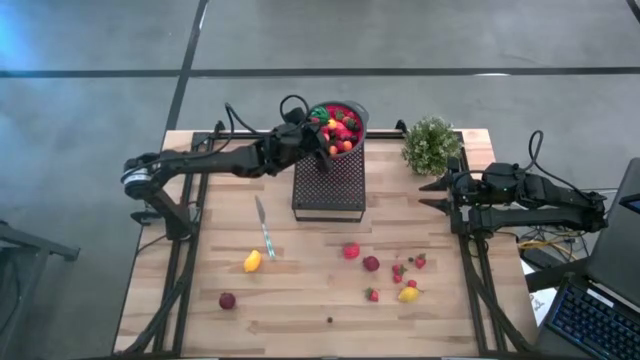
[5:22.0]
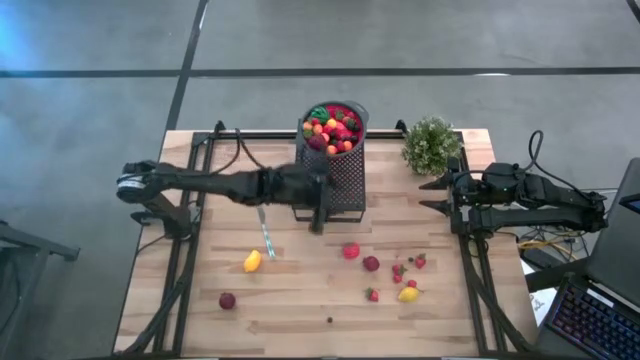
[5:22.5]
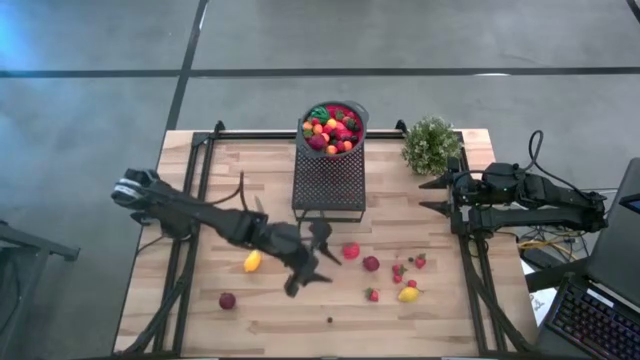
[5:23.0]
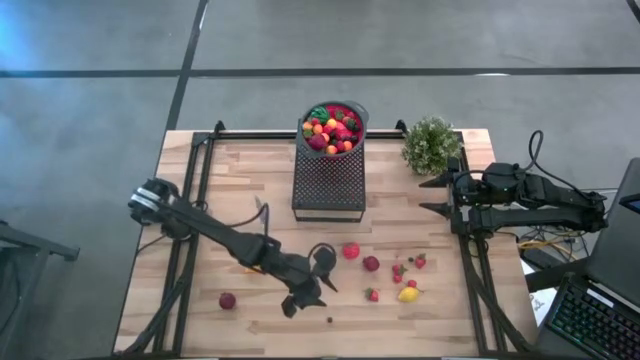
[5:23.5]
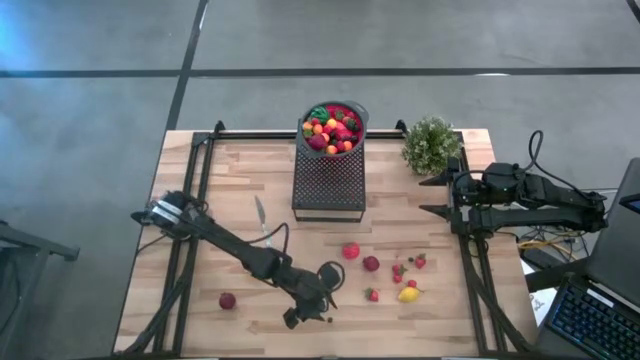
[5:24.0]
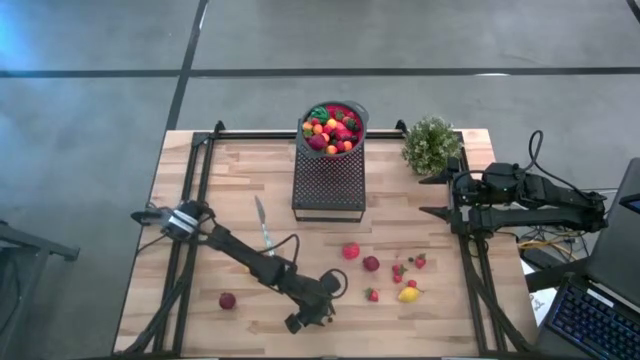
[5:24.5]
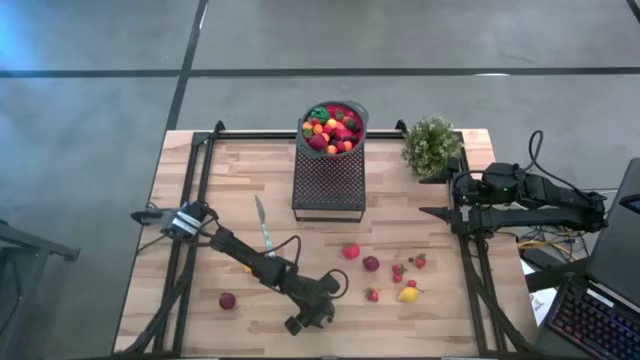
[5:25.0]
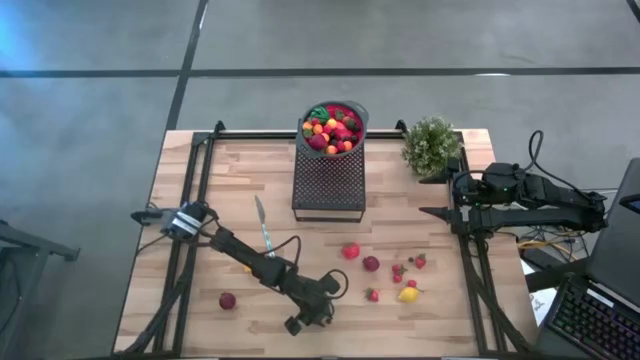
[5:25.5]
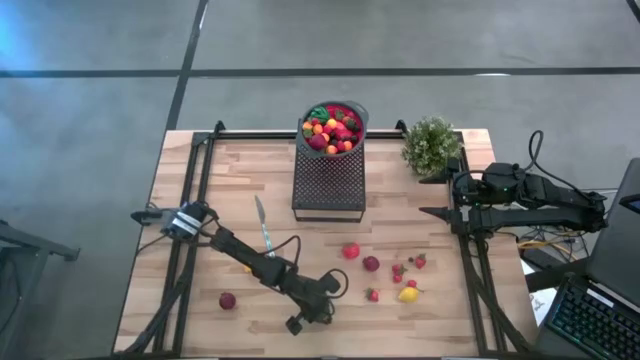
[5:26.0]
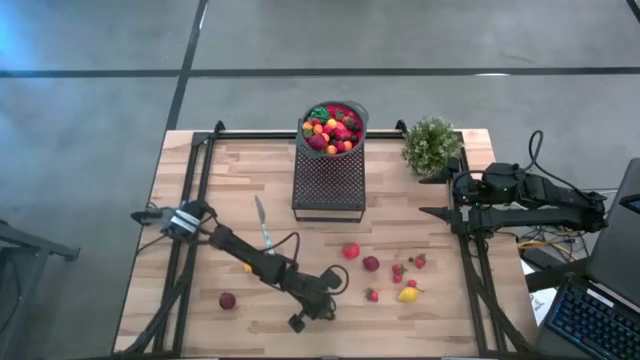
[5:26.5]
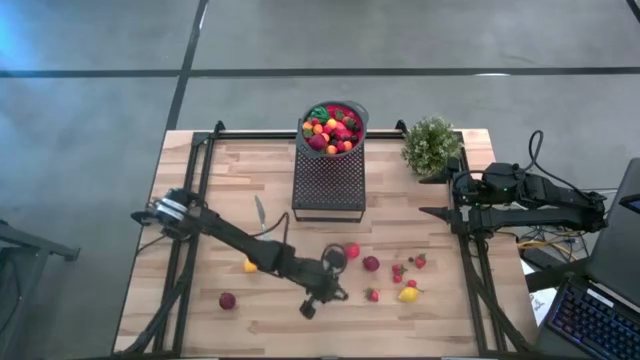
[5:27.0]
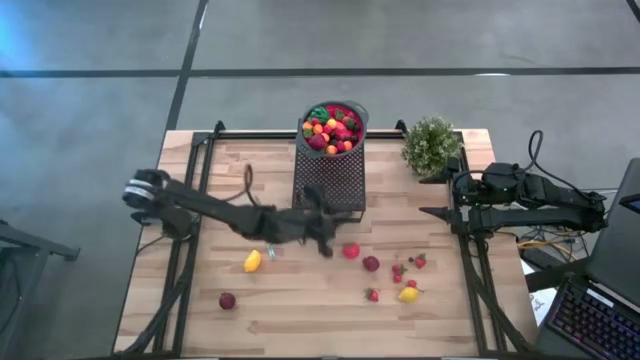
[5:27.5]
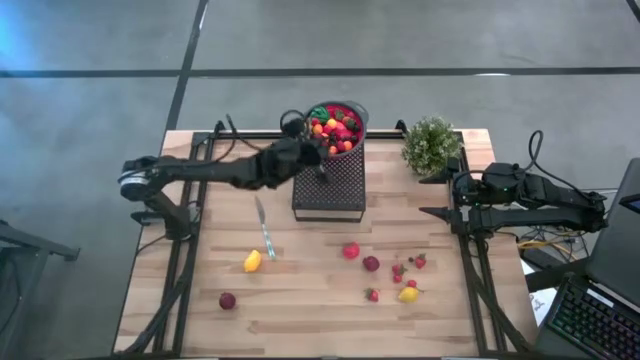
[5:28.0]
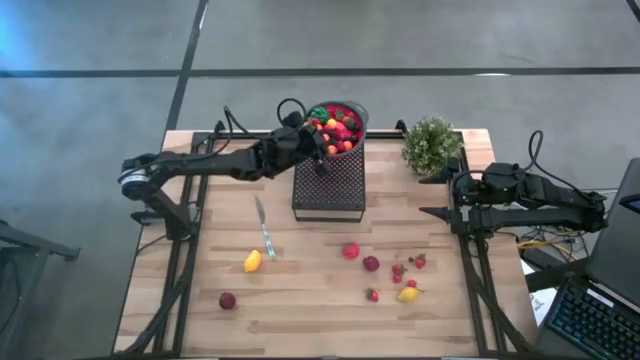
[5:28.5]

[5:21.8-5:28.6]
Task: Pick & Place Fruit
Put the left blueberry into the strainer bowl on the shelf

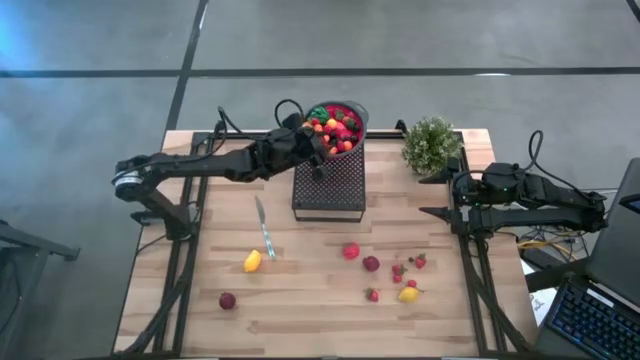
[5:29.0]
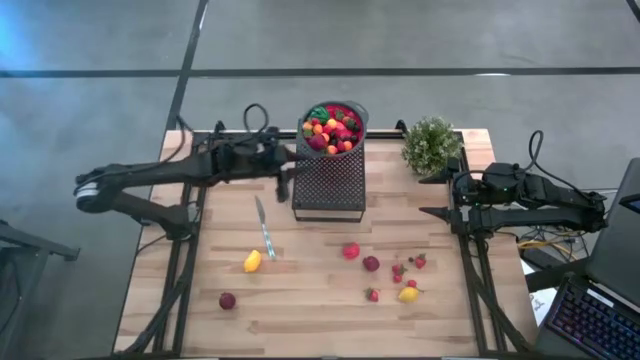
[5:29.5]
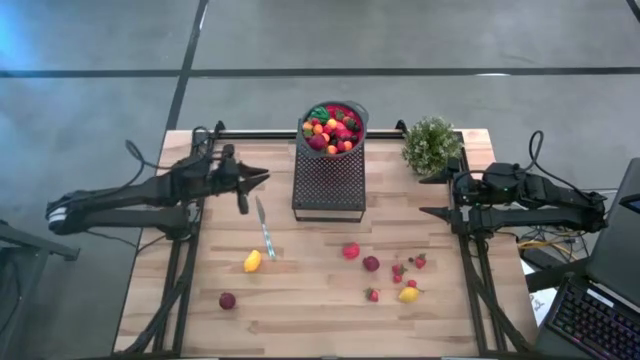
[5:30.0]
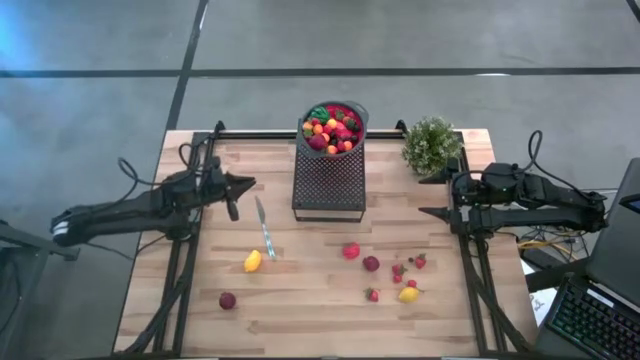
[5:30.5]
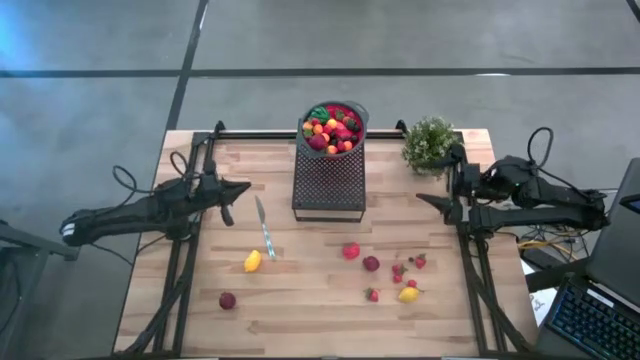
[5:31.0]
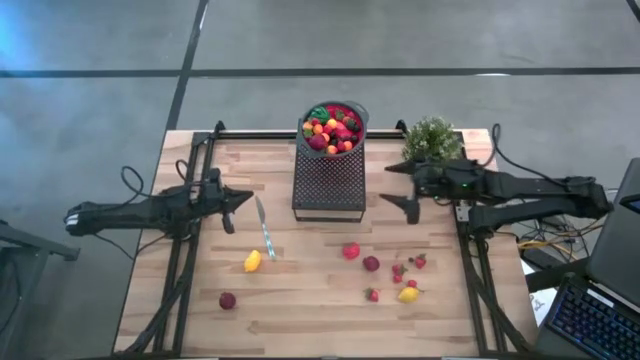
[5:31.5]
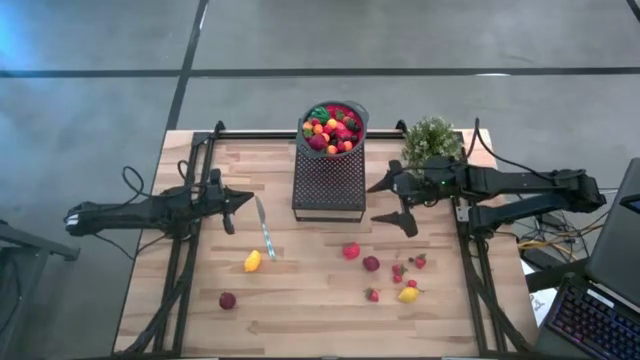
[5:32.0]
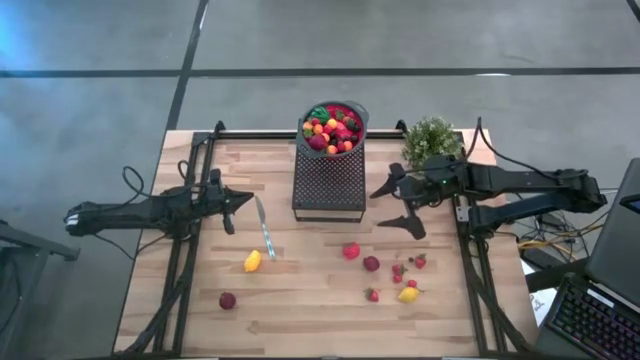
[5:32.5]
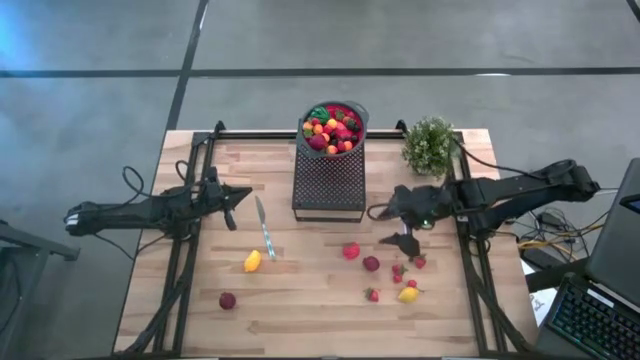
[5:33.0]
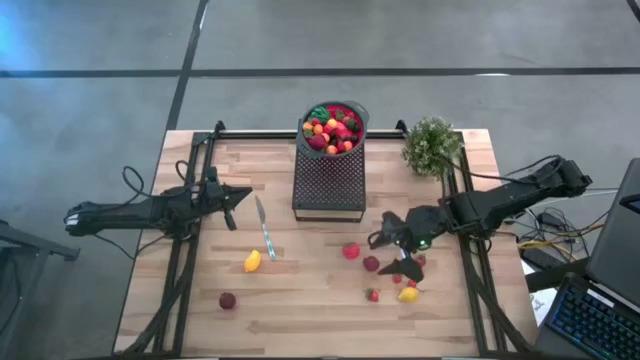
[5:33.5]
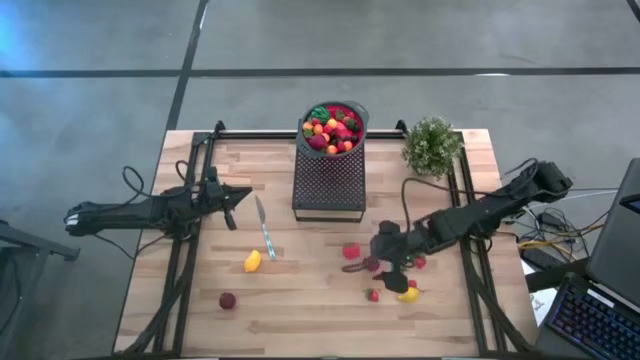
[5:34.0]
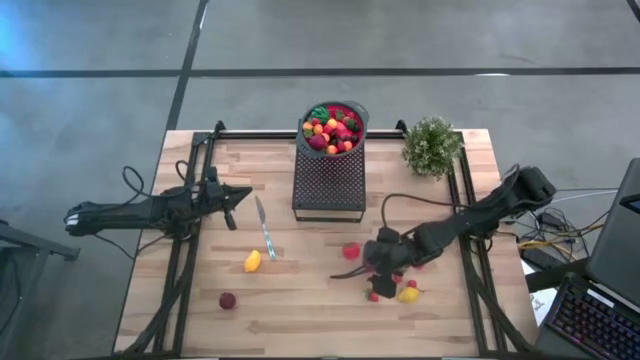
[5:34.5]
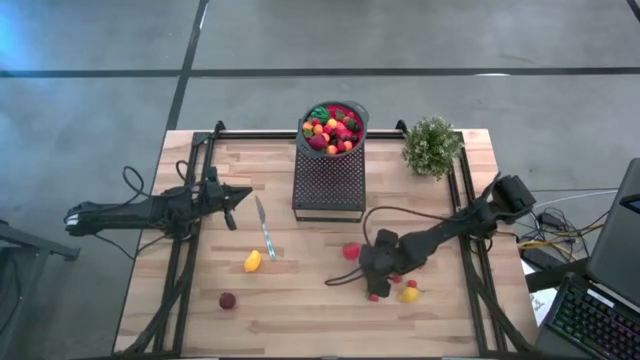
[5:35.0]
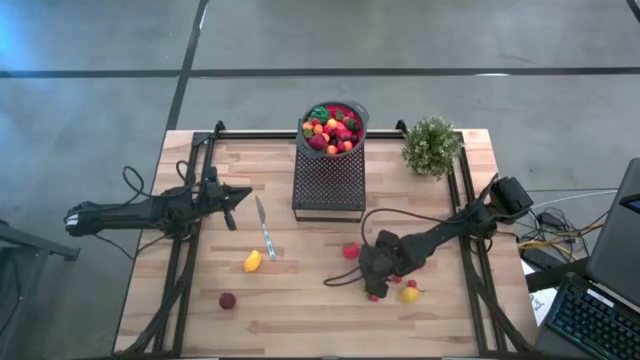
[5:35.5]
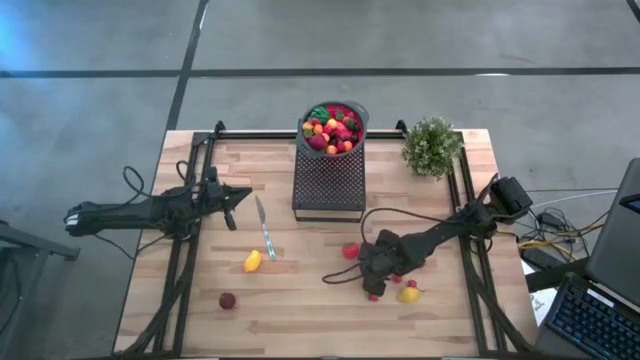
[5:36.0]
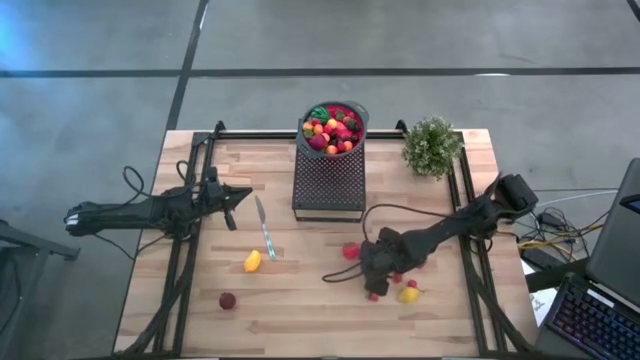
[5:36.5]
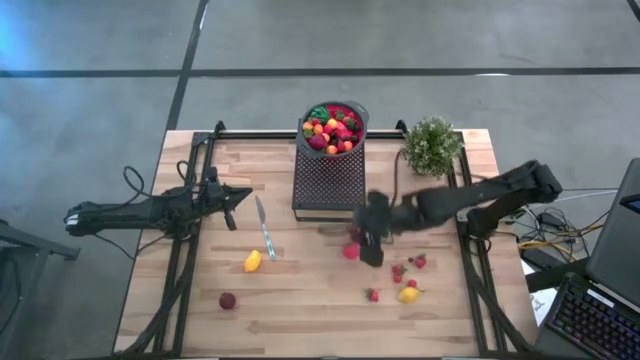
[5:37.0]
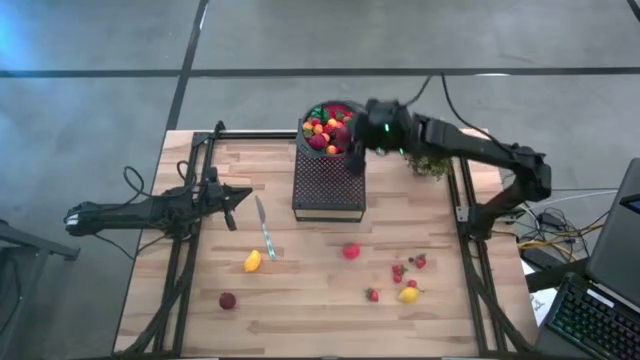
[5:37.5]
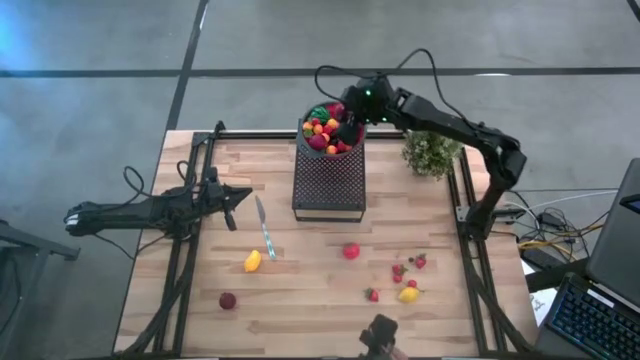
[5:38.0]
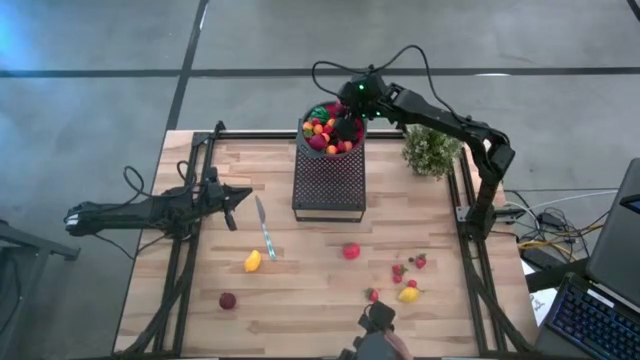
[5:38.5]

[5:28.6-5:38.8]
Put the right pomegranate into the strainer bowl on the shelf

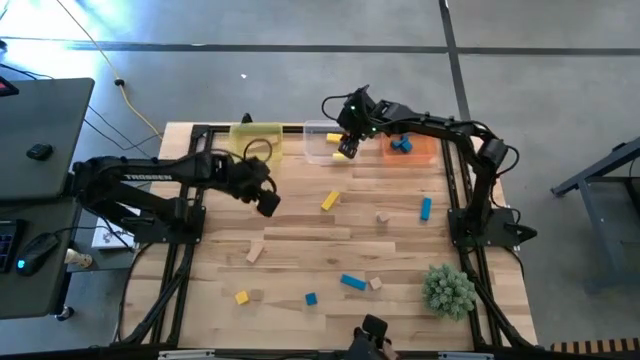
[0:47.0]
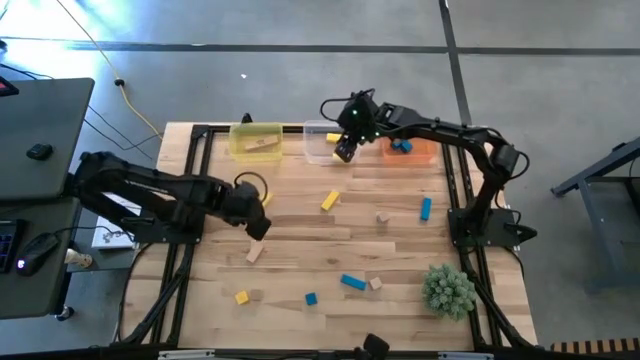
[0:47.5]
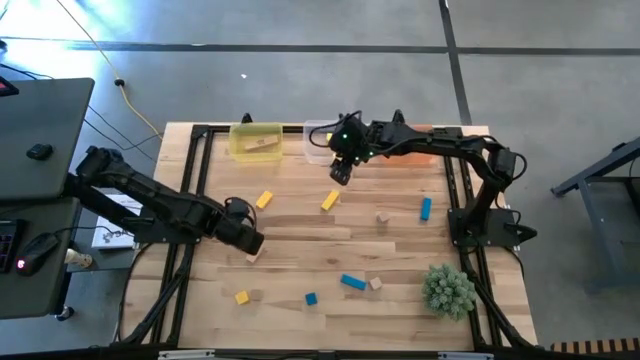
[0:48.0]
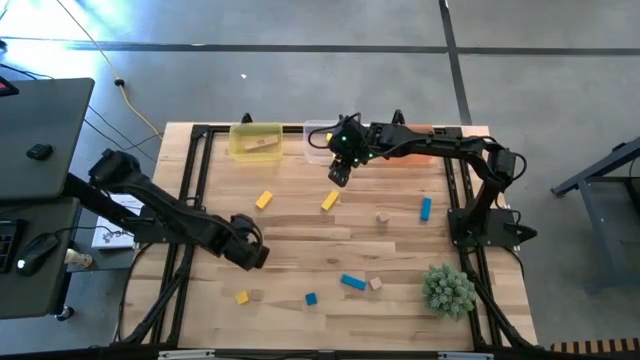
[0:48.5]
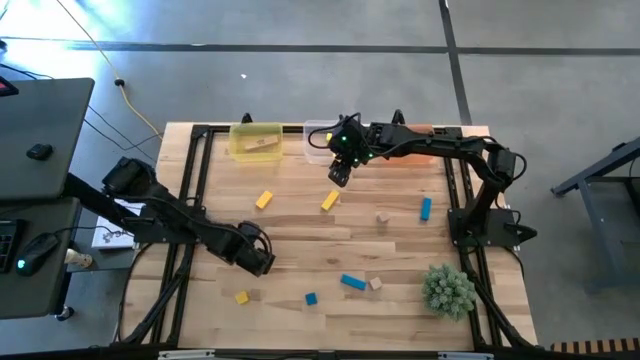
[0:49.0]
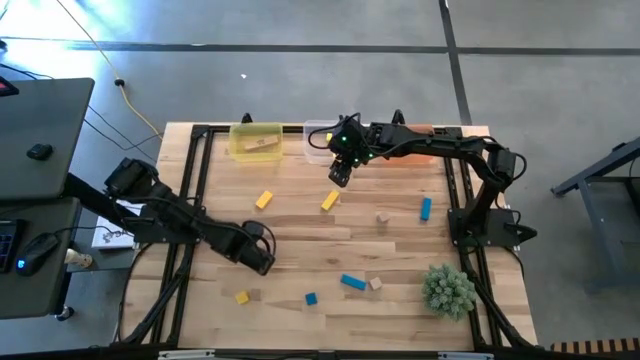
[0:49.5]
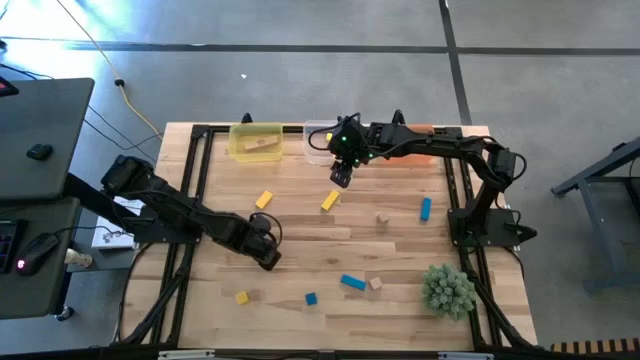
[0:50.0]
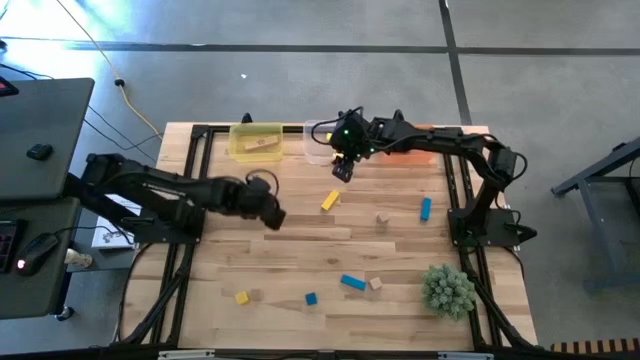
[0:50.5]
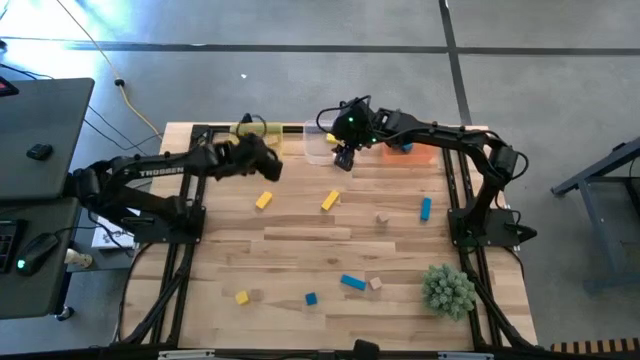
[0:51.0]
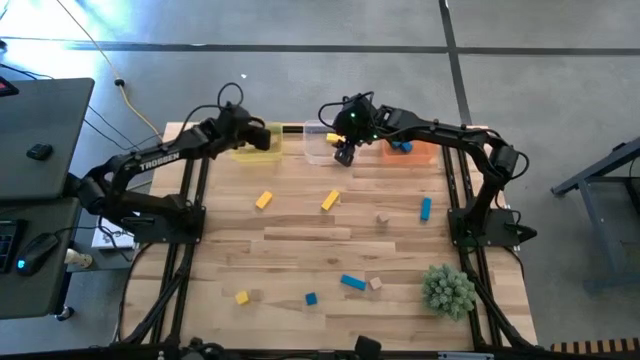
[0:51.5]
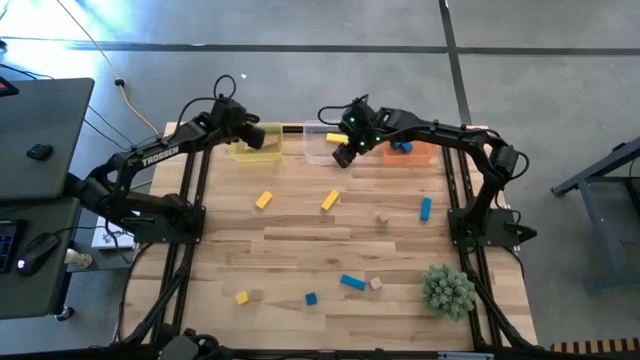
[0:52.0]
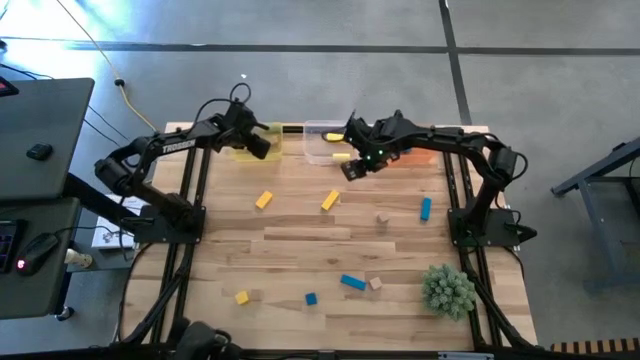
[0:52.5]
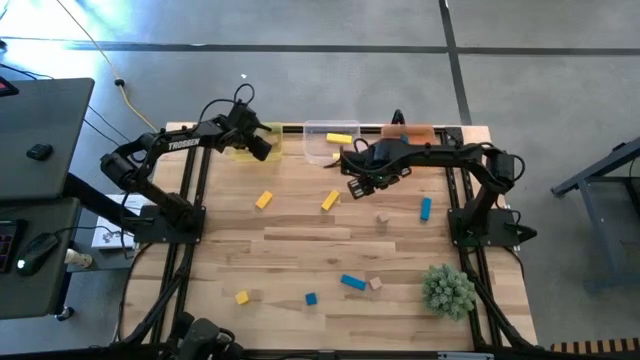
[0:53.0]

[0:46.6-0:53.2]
Task: Sort & place blocks by color
Put the brown block into the yellow bin
